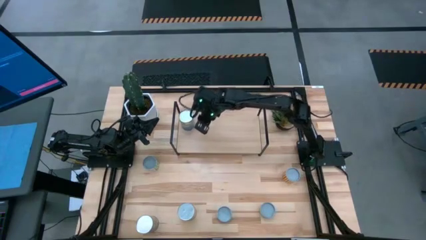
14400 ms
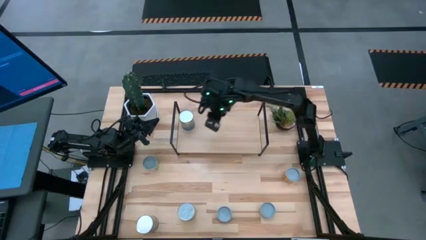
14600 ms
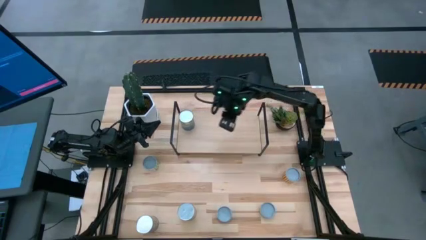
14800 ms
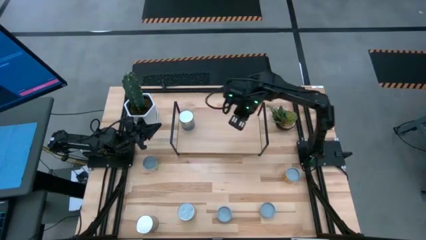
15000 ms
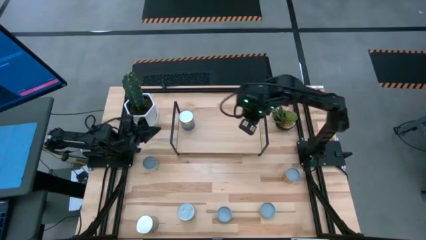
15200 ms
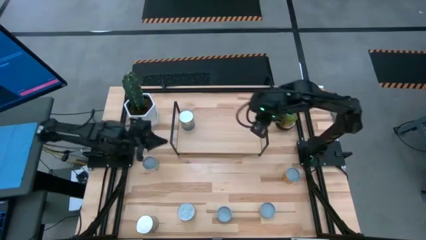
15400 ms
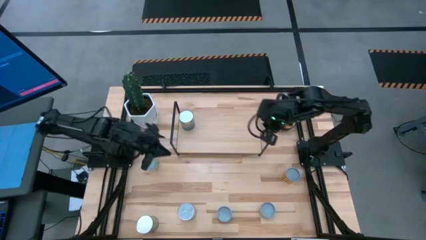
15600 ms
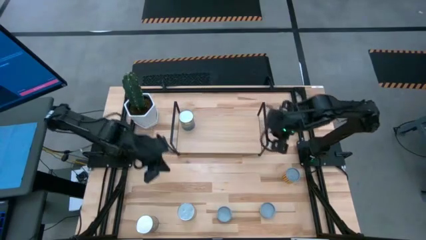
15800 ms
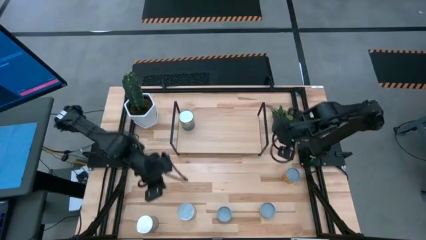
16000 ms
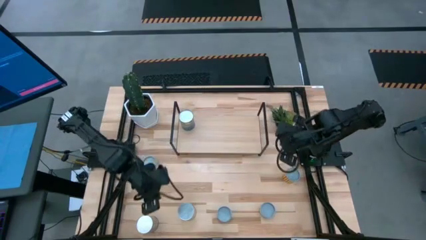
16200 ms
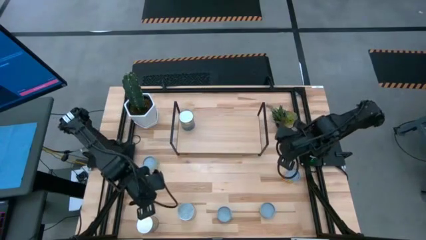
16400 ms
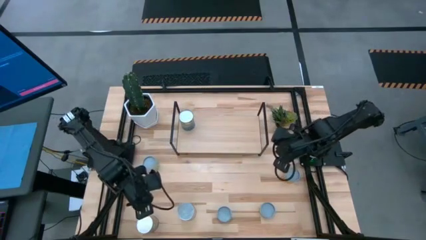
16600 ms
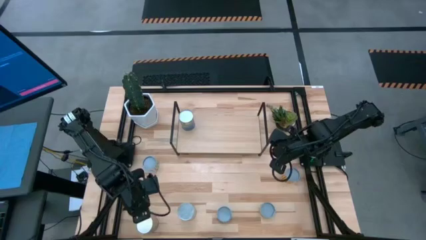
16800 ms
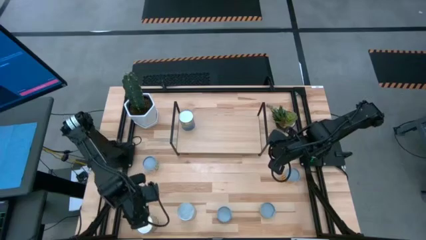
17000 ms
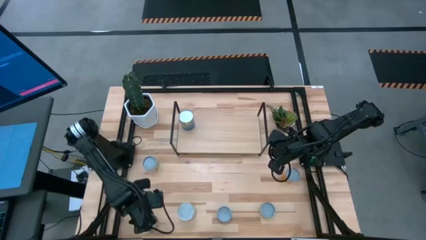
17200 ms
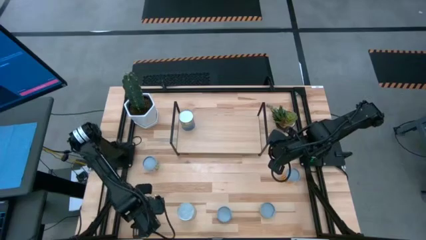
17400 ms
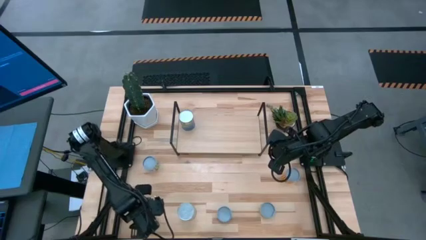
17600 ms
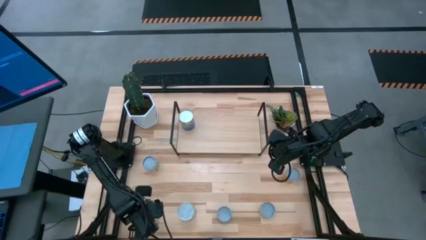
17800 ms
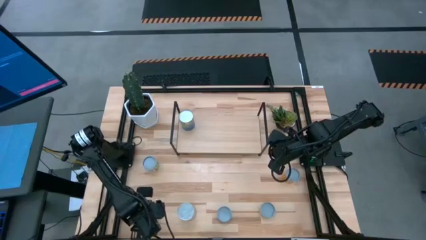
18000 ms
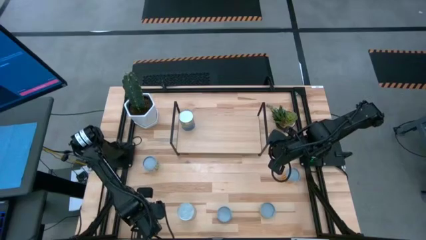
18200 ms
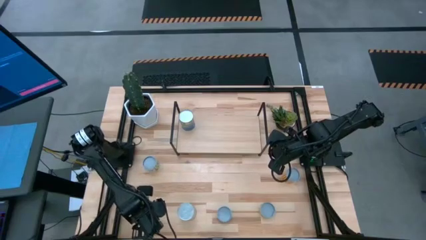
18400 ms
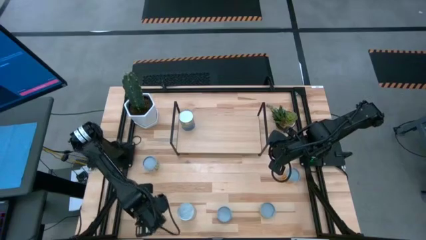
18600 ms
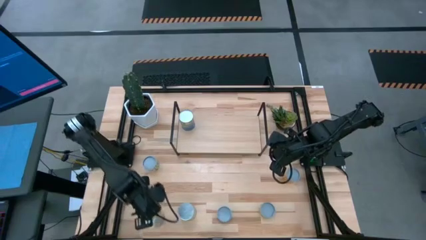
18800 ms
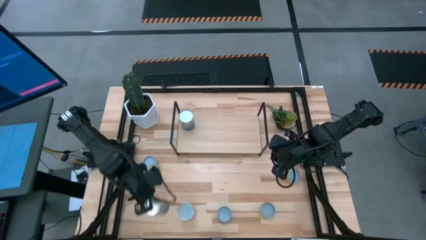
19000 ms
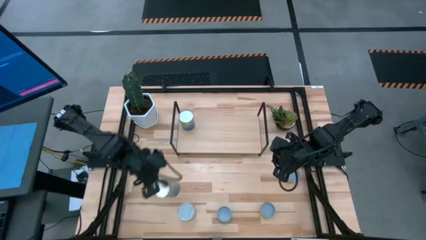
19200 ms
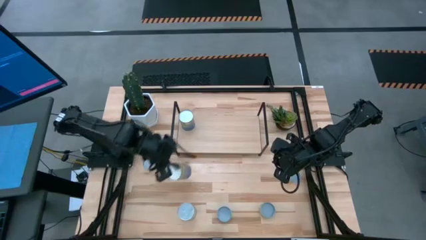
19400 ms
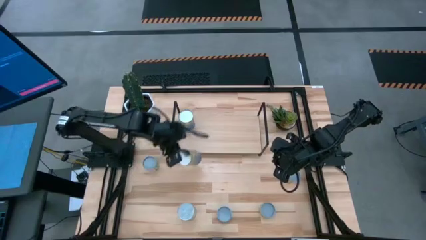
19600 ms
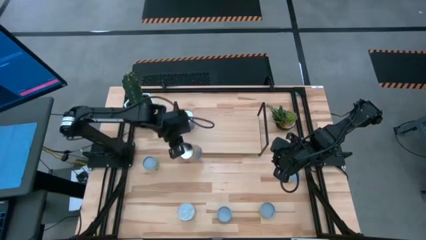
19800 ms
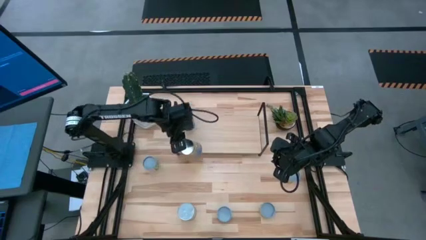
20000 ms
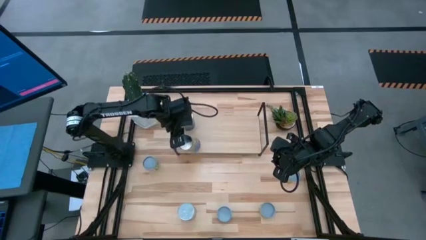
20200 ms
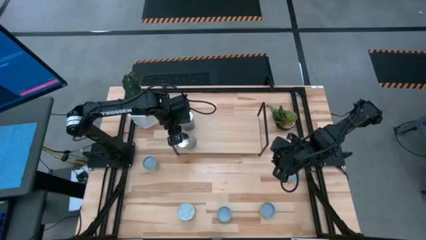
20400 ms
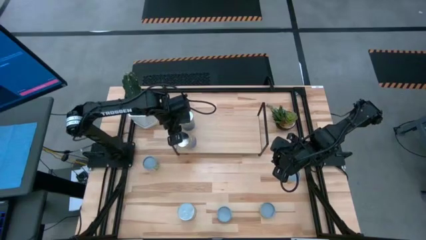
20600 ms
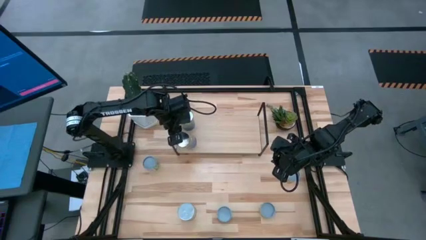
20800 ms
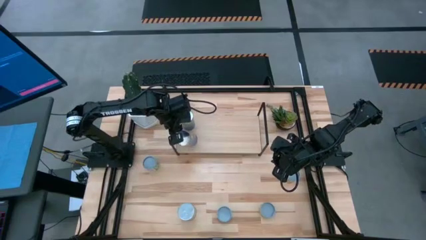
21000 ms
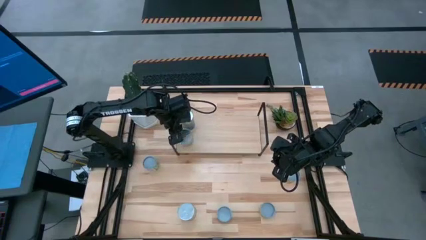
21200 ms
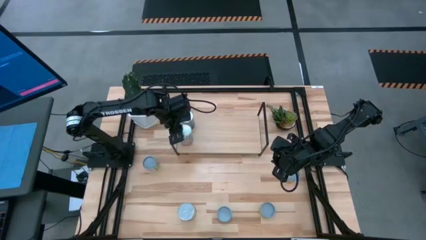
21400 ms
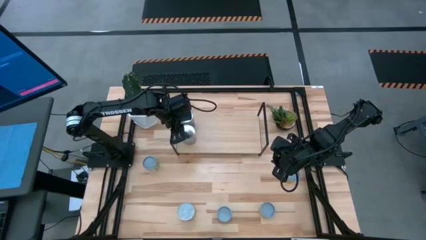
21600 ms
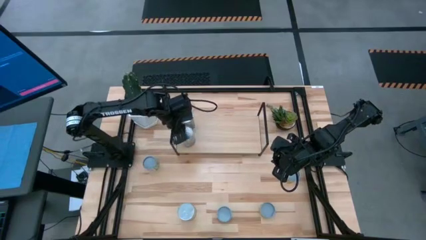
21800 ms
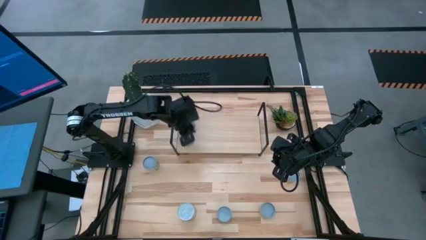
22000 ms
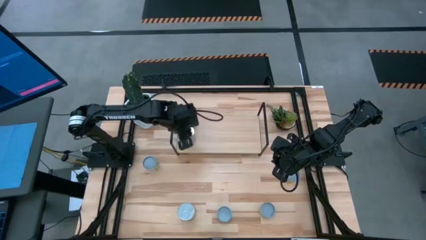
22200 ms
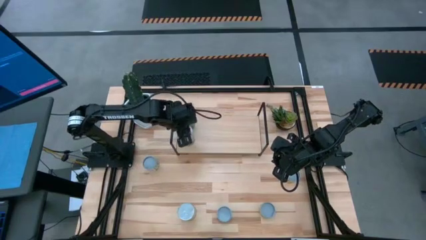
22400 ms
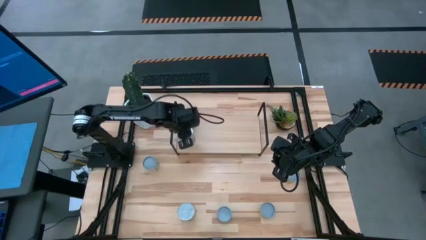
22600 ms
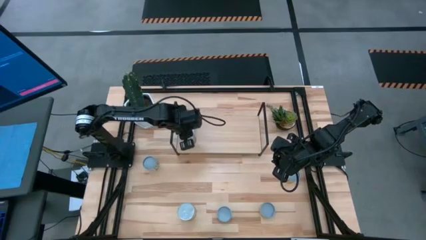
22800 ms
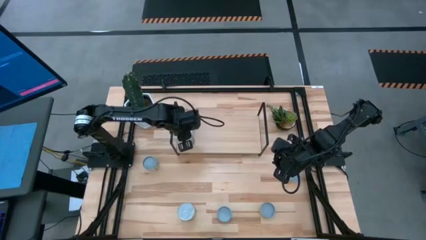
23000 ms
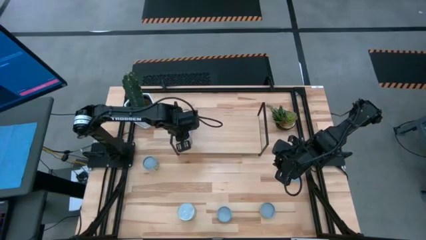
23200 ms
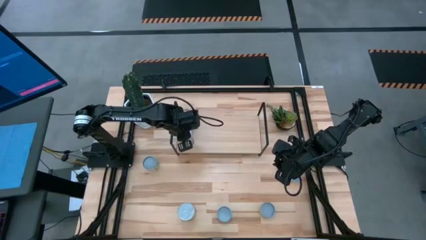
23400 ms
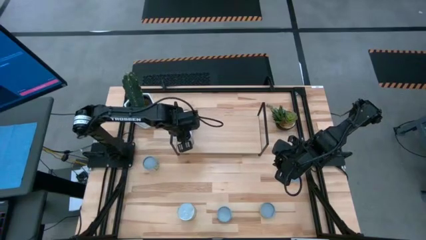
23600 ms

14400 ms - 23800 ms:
Task: Pick and place cans onto a shelf
Put the canned peaches on the shelf

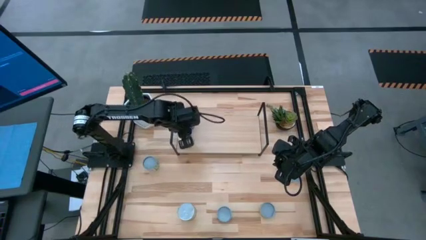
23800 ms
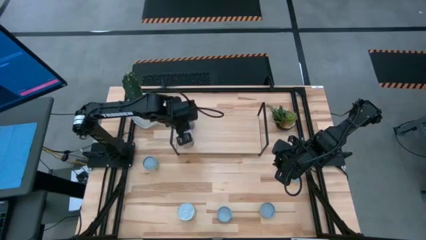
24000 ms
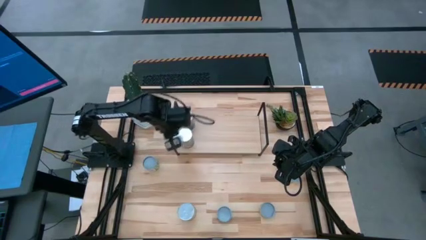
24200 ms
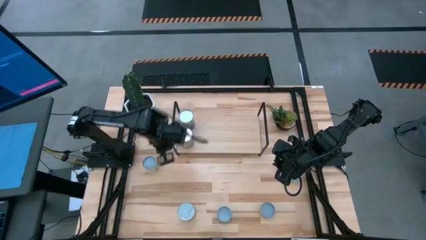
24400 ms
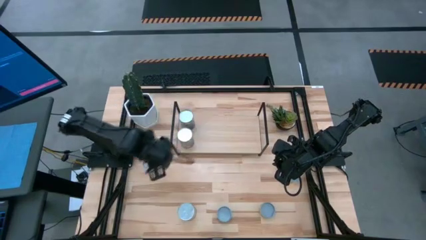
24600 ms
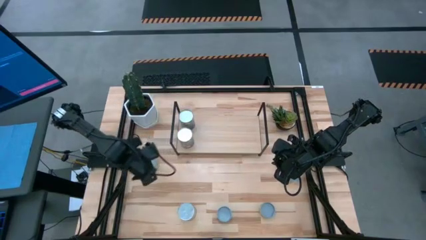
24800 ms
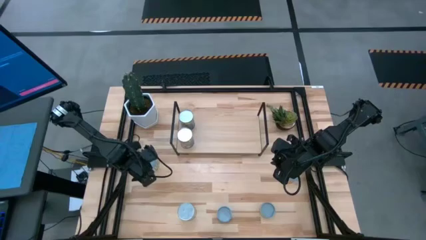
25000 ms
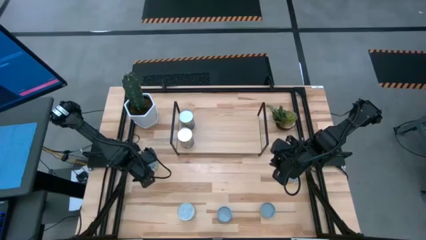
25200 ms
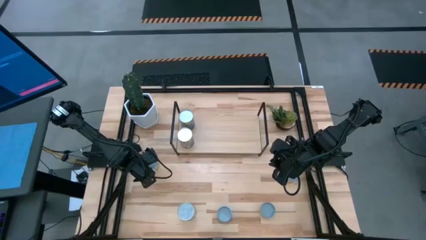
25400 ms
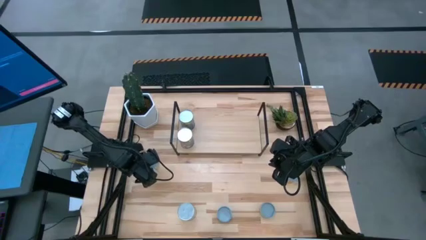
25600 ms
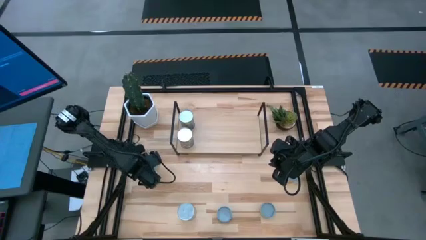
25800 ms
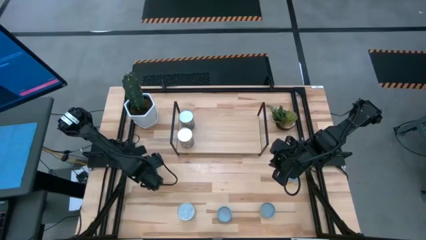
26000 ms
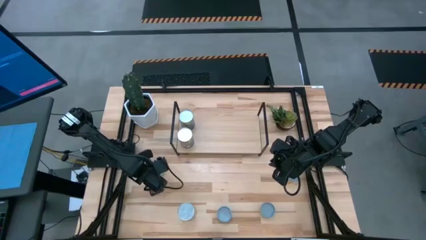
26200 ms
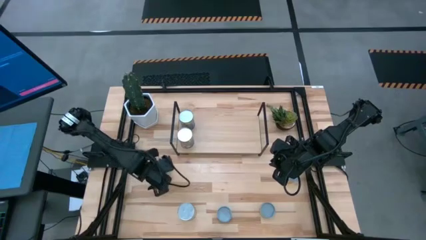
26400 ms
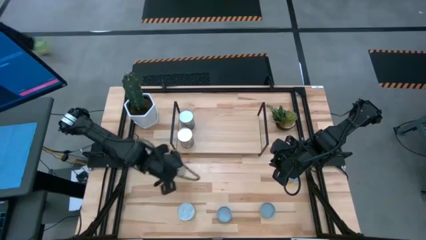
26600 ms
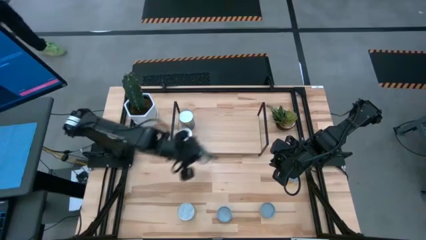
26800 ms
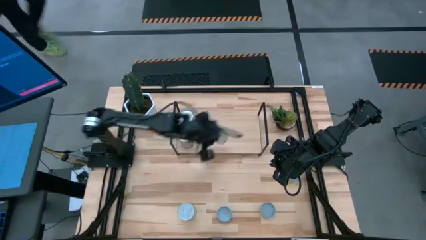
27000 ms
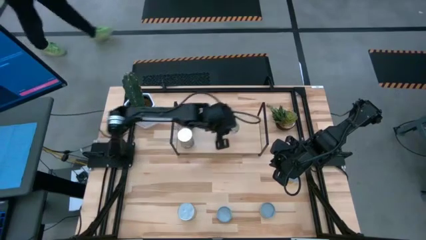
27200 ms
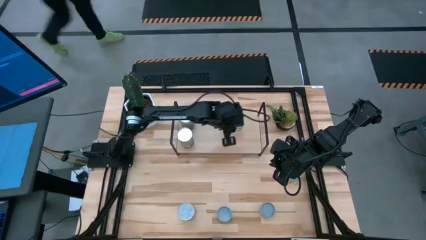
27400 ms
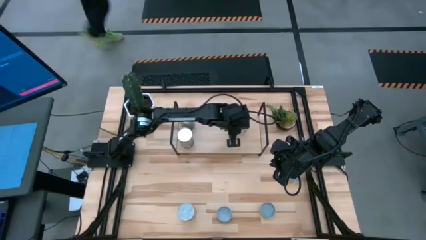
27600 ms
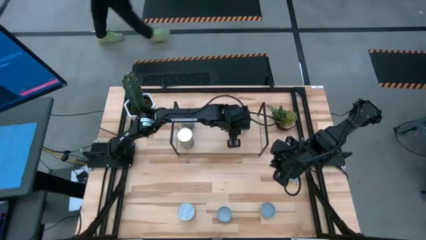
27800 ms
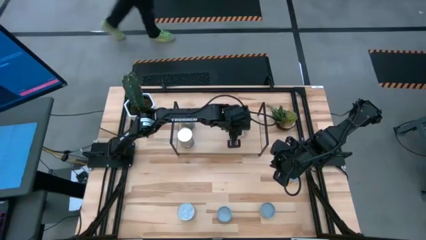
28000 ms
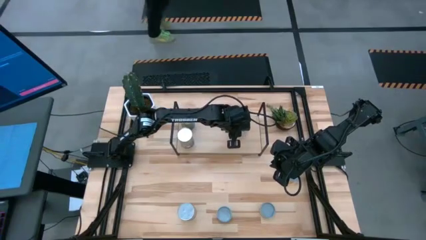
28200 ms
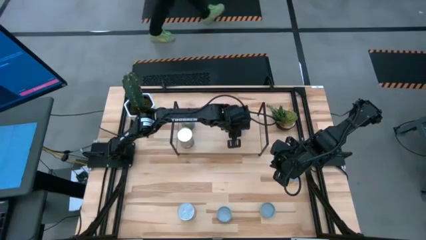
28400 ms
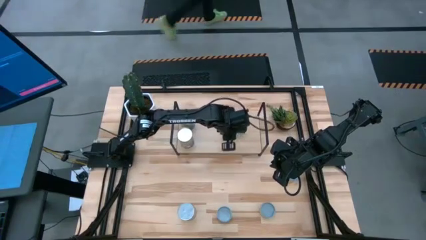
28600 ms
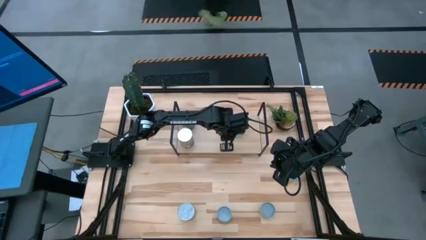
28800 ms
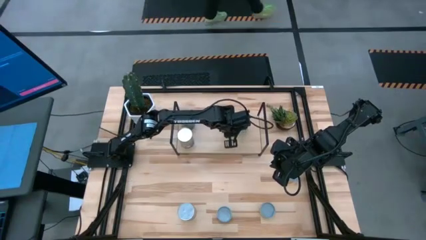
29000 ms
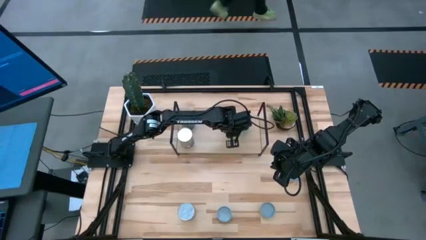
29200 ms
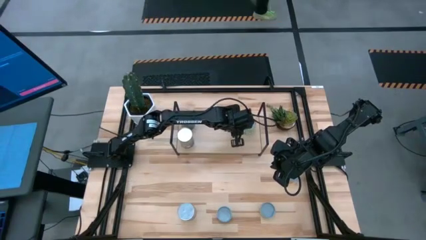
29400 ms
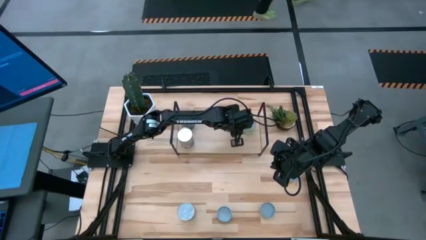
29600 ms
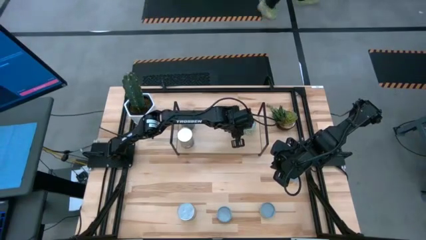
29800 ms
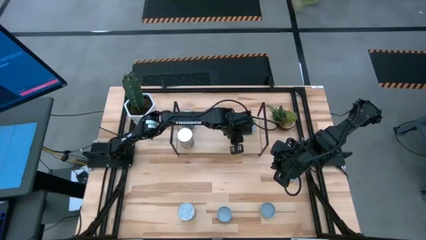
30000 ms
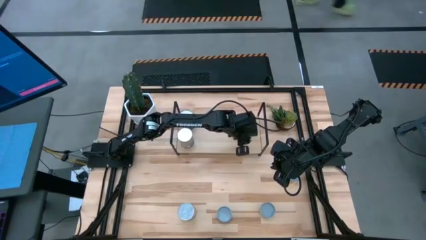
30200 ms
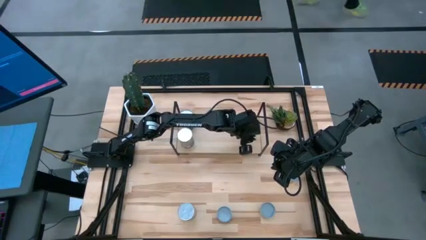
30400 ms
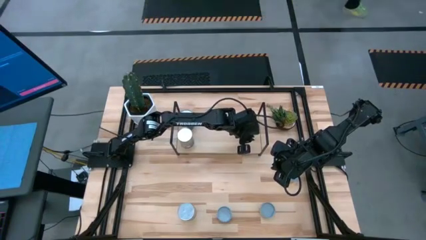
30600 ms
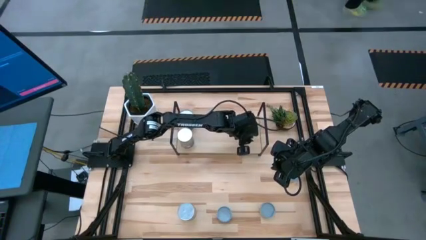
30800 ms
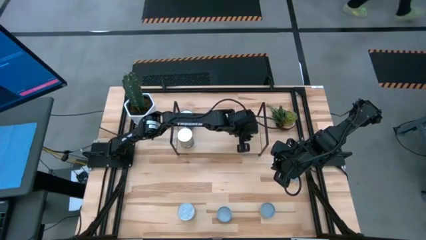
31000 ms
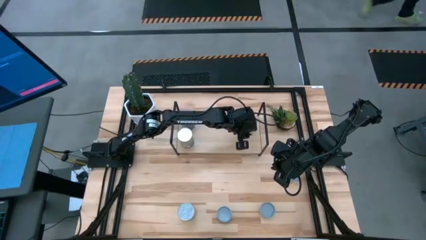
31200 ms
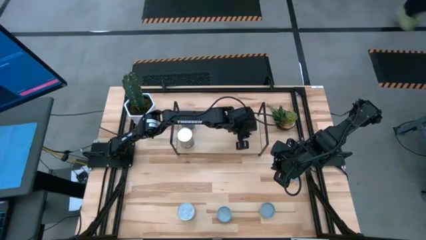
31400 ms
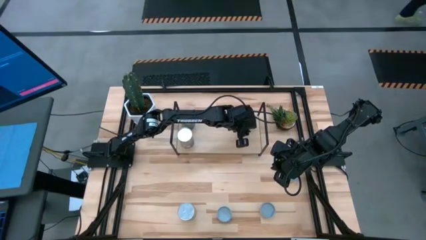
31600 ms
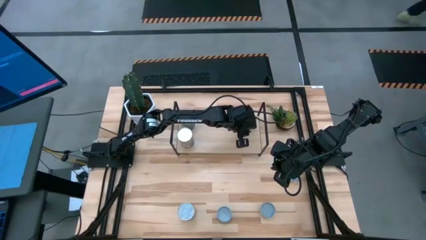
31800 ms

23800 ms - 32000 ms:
Put the canned green peas on the shelf
